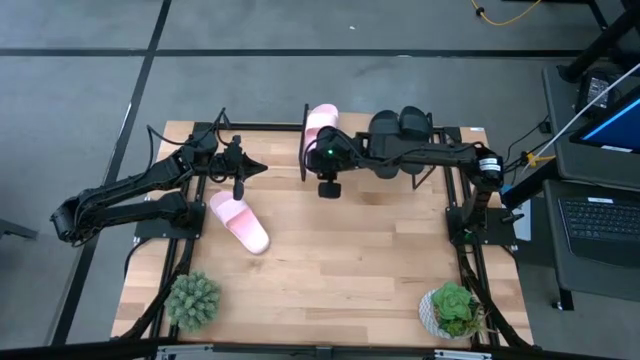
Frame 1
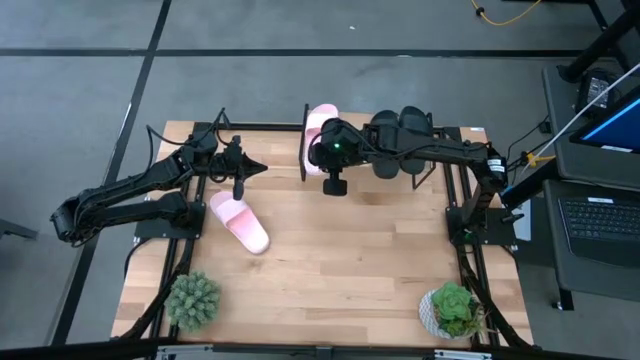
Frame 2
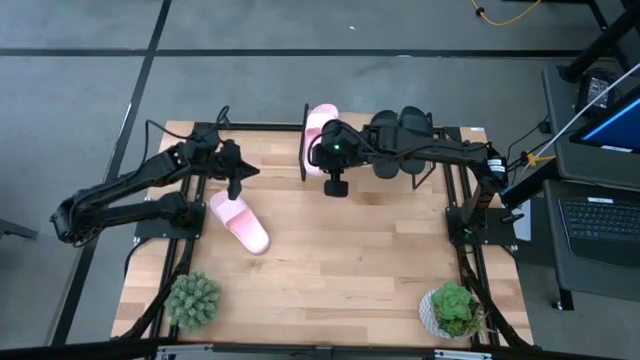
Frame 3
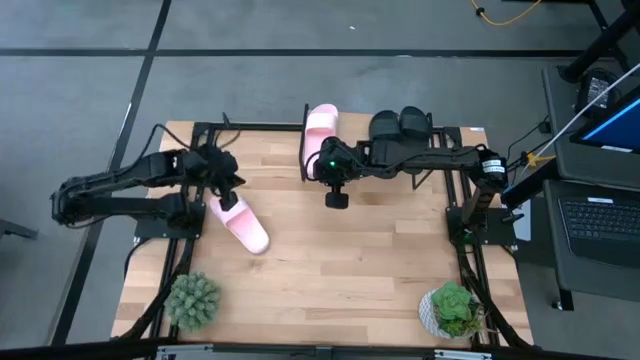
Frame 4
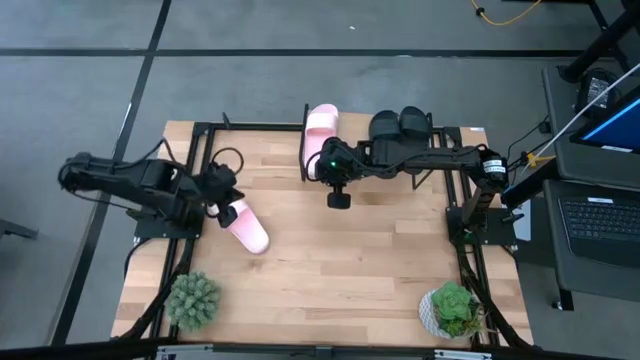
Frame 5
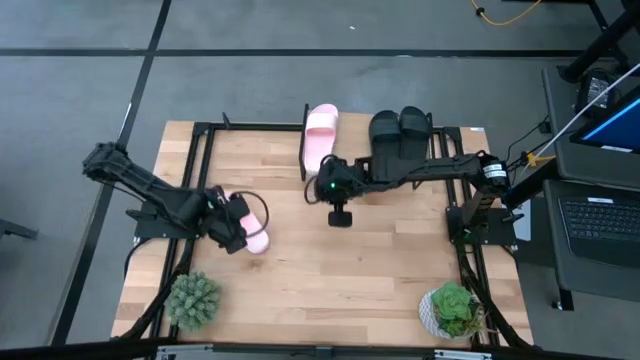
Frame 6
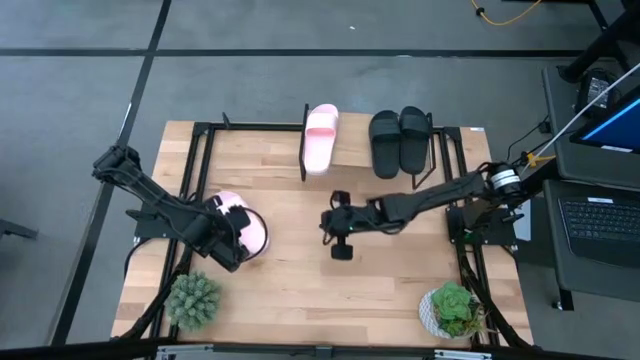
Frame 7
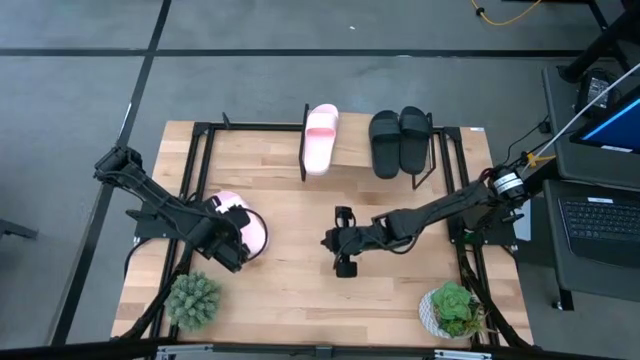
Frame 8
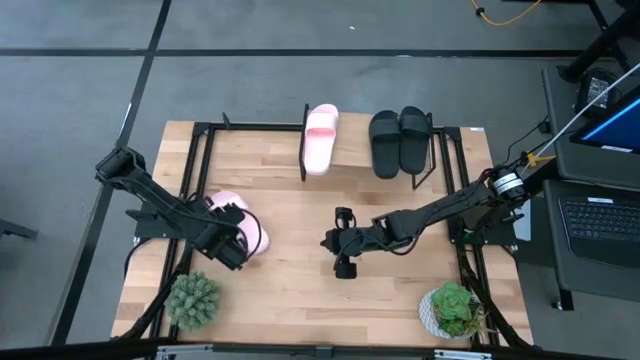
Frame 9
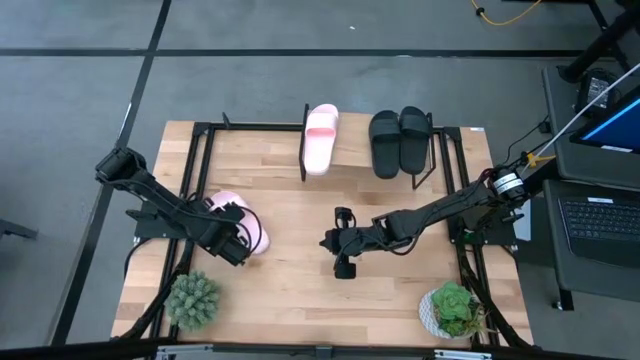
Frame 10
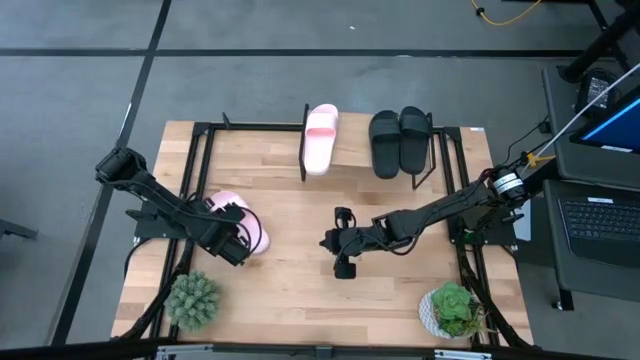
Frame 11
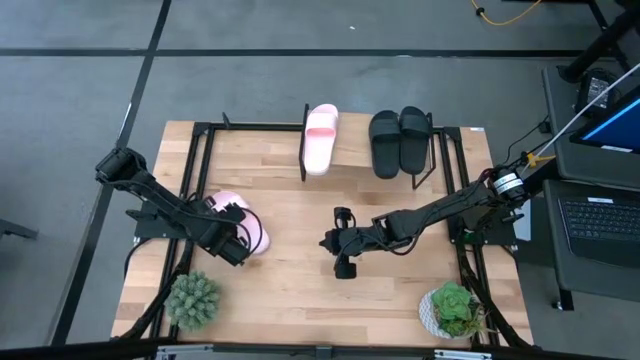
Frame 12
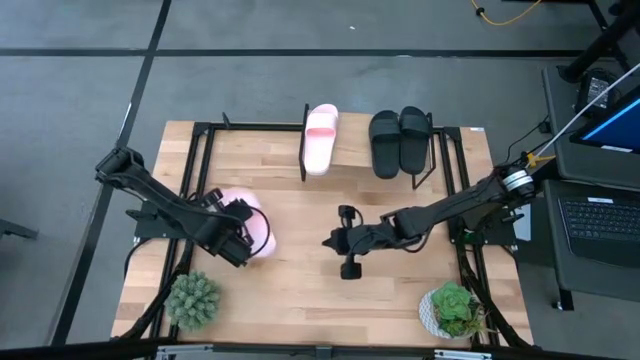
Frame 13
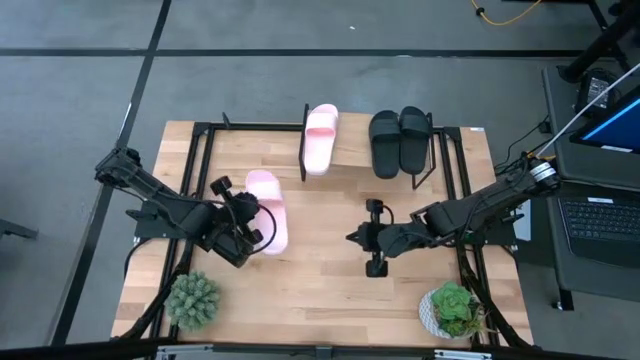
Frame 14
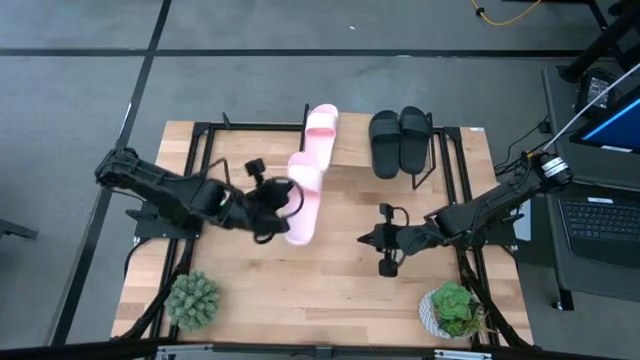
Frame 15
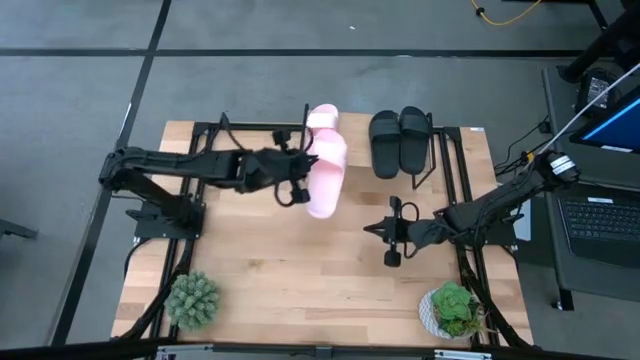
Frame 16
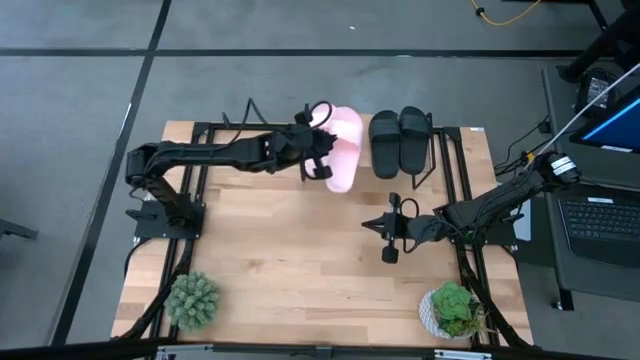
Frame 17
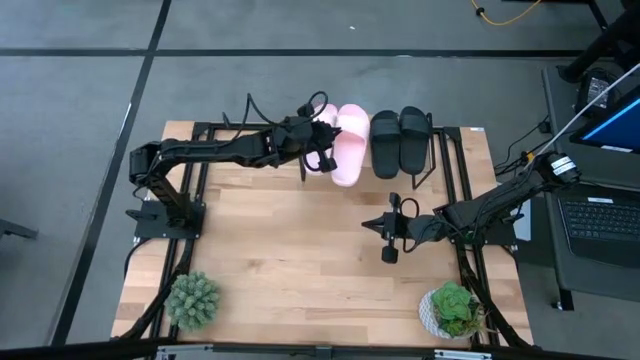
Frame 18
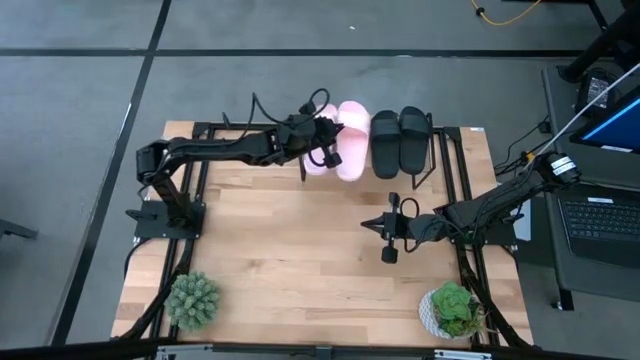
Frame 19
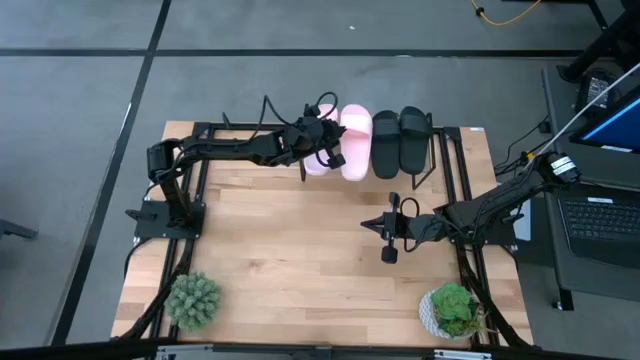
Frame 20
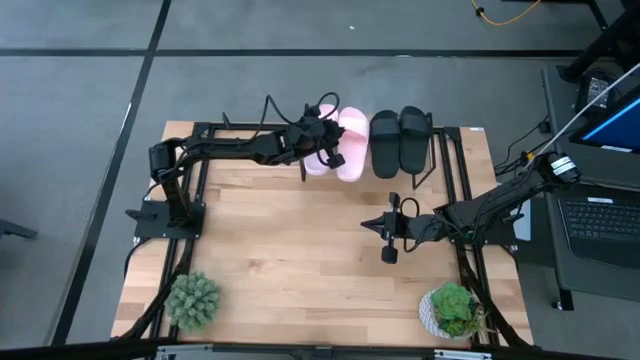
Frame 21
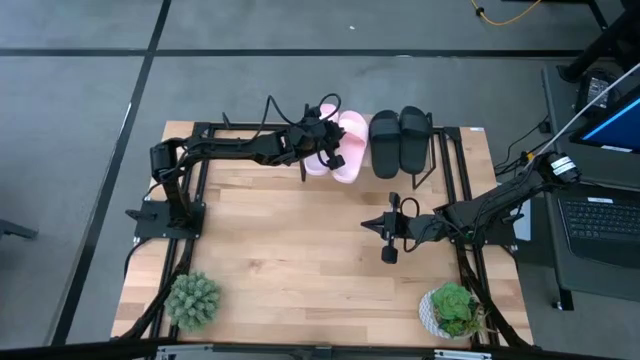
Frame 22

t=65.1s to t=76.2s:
Task: Pick and place slides into the shelf
Put the pink slides on the shelf

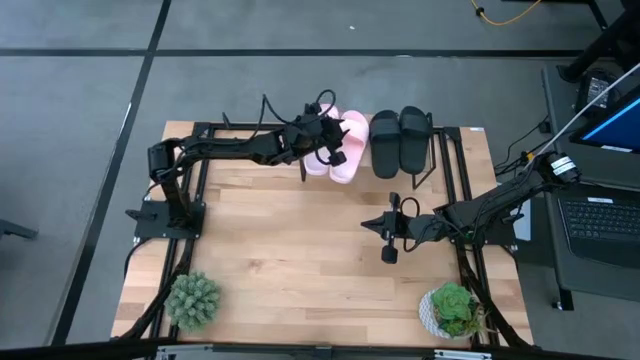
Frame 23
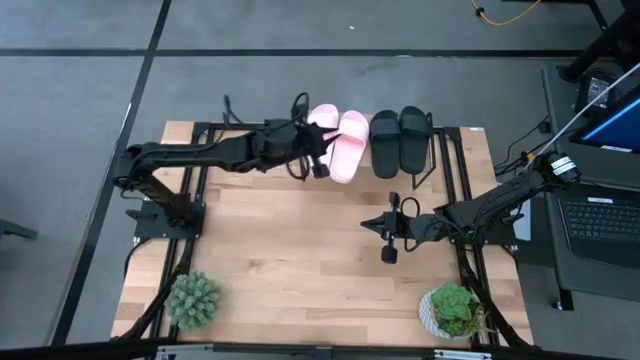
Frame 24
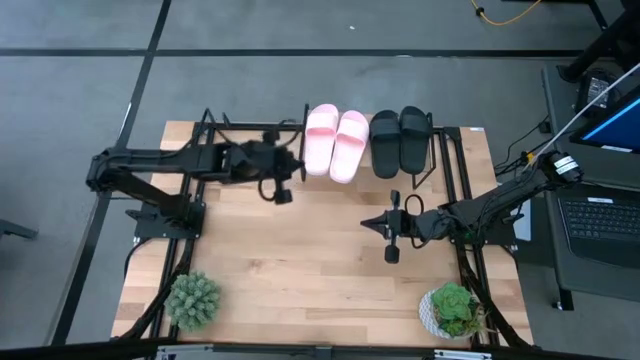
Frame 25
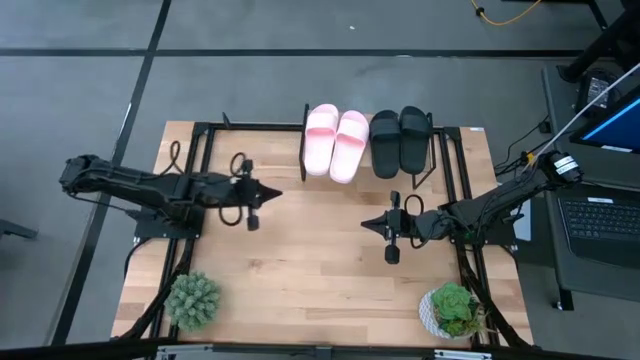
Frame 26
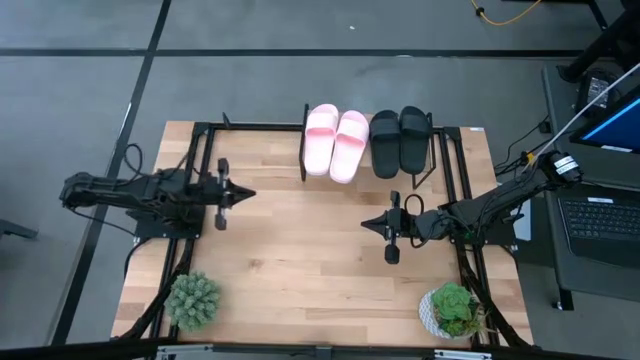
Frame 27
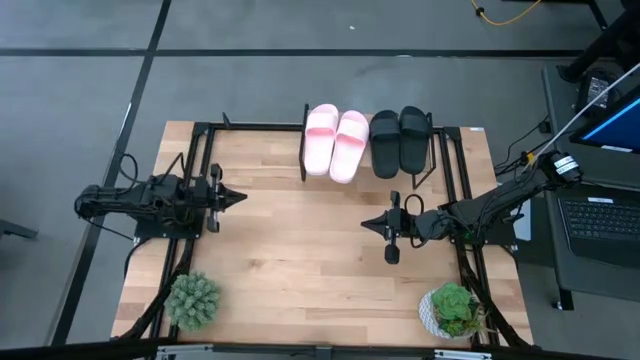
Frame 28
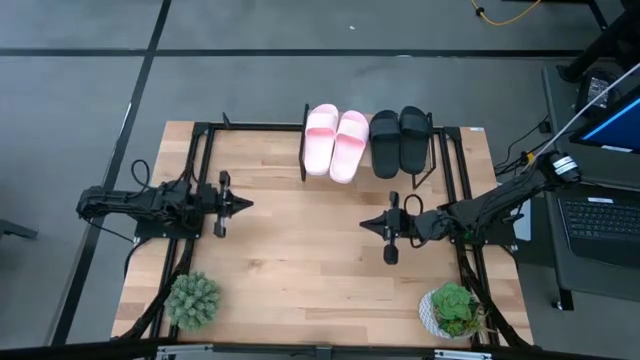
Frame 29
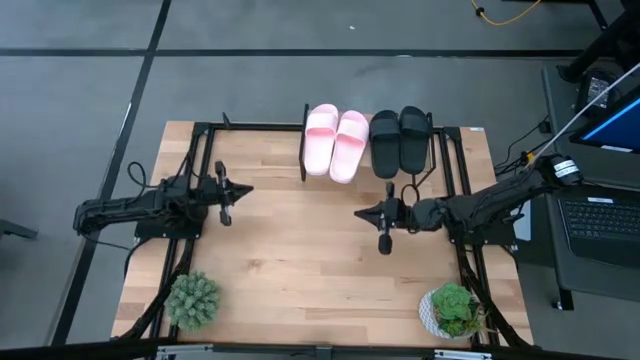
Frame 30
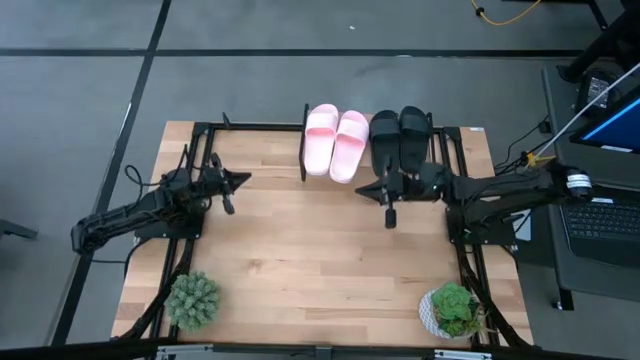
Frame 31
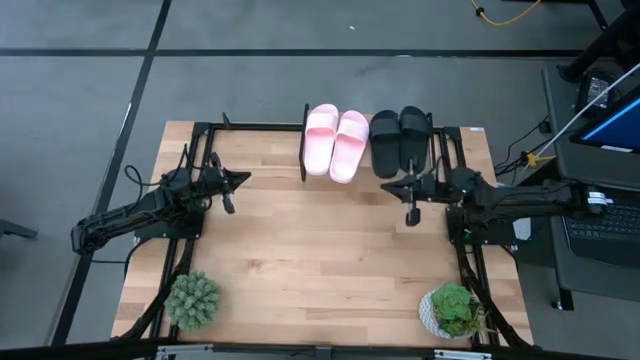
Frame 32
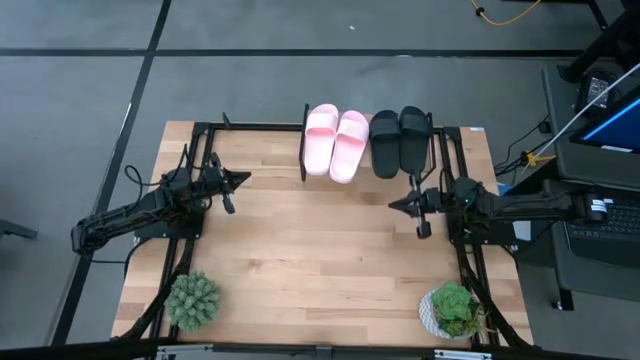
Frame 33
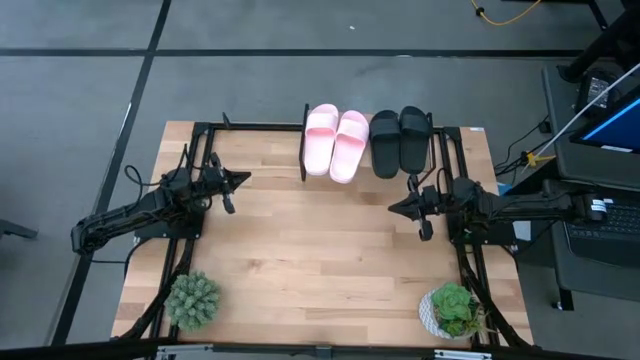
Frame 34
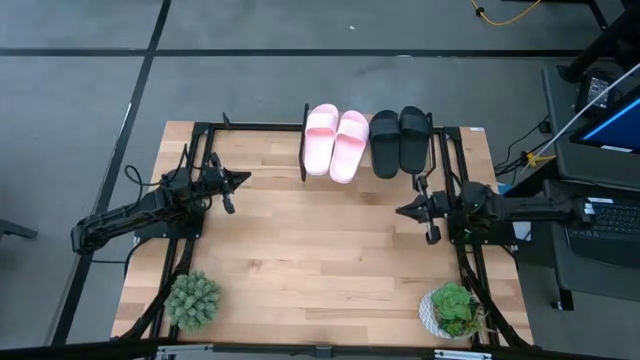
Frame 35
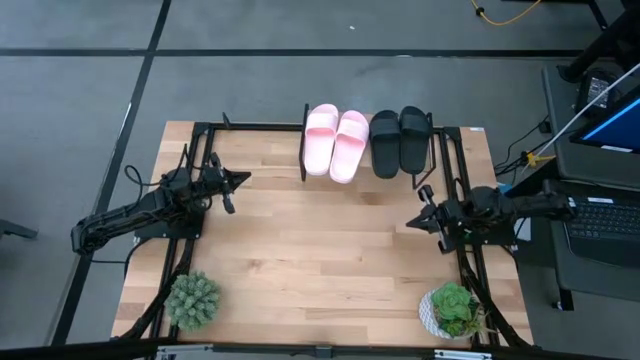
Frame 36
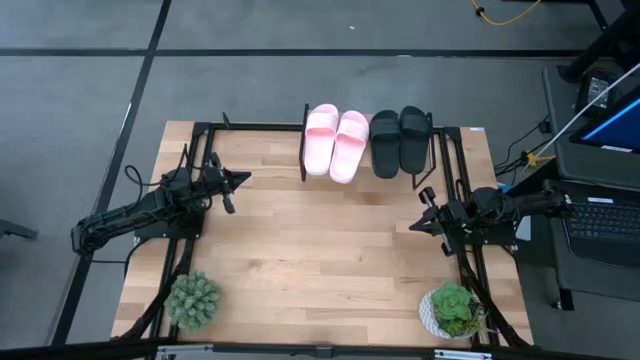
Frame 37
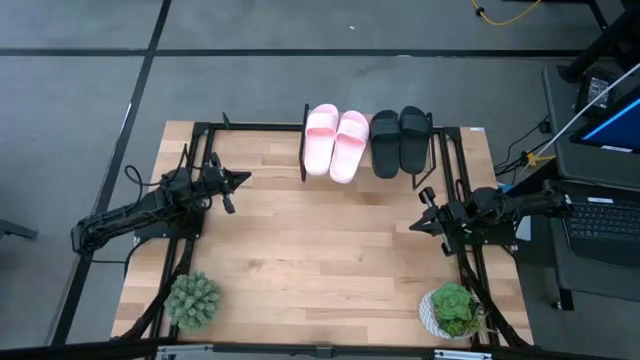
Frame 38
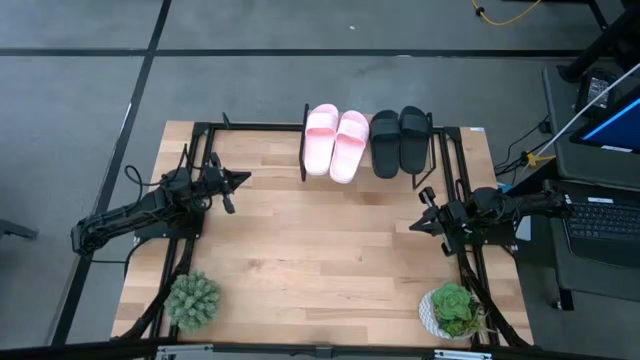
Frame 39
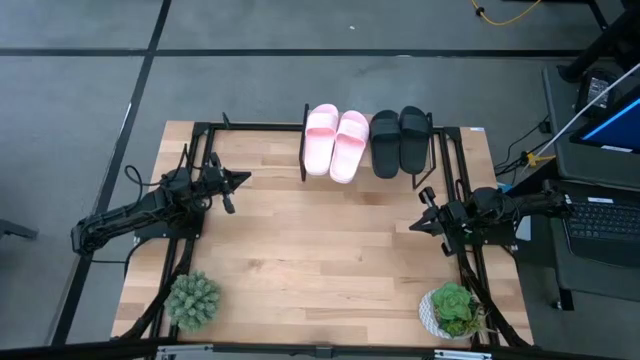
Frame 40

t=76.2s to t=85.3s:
Return to Home Position

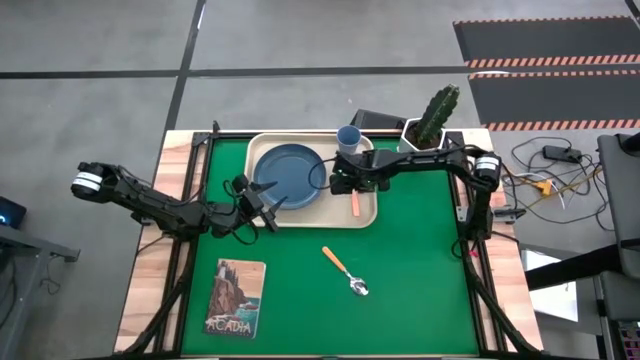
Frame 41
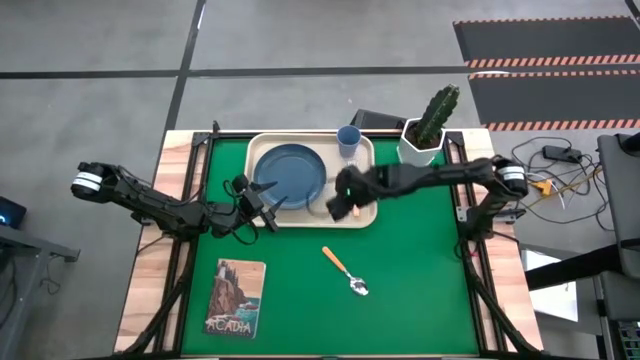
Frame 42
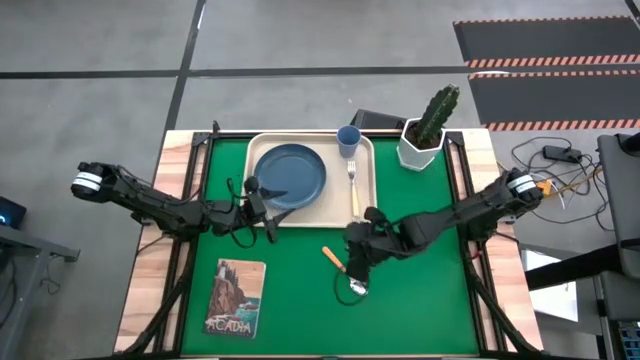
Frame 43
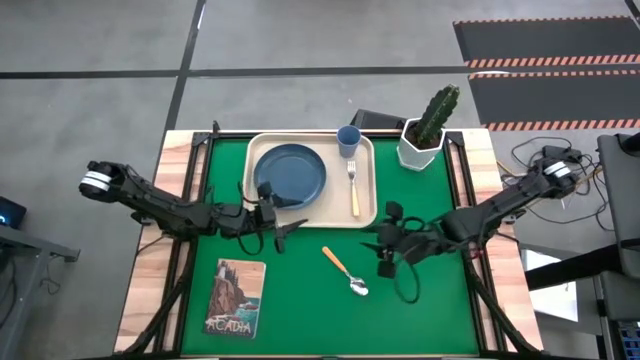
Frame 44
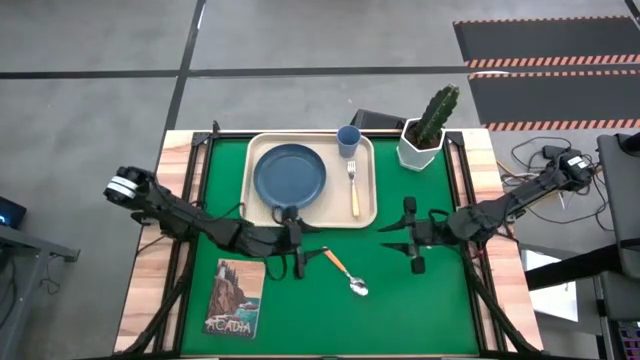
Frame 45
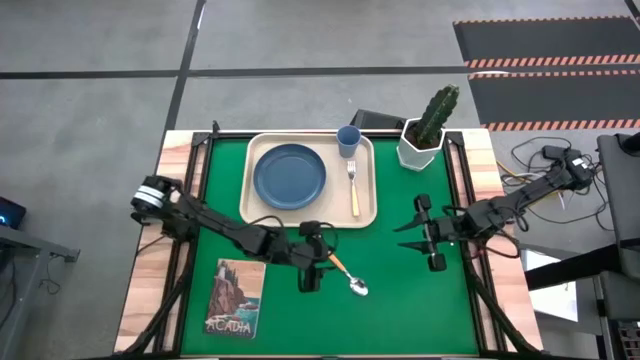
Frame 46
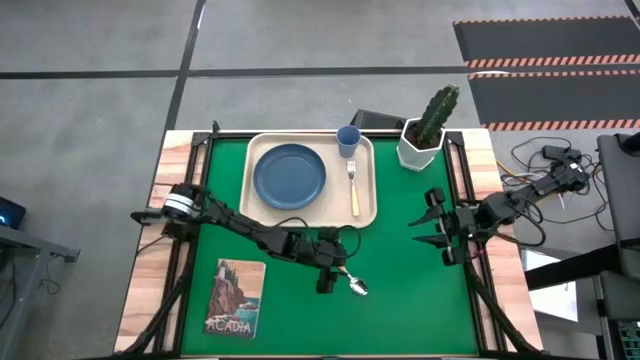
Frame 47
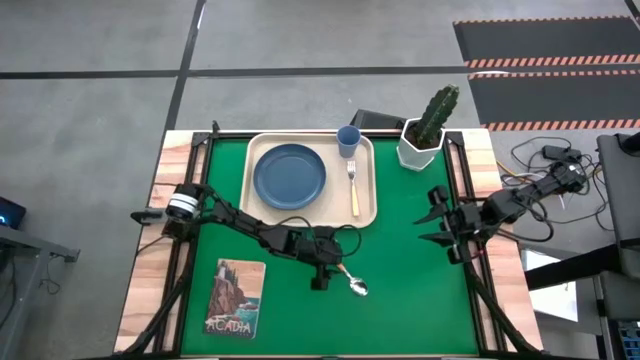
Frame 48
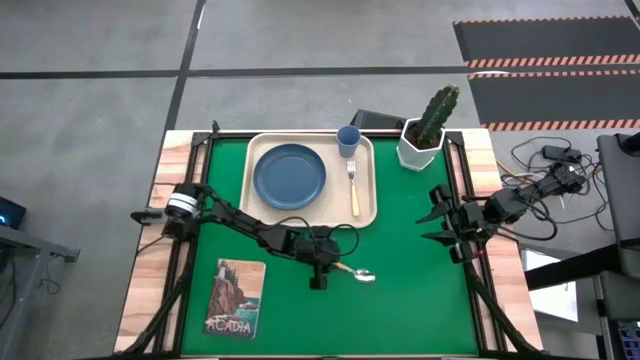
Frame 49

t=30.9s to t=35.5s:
Task: Pick and place plate/cup/fork/spoon on tray
Put the yellow spoon on the white tray
